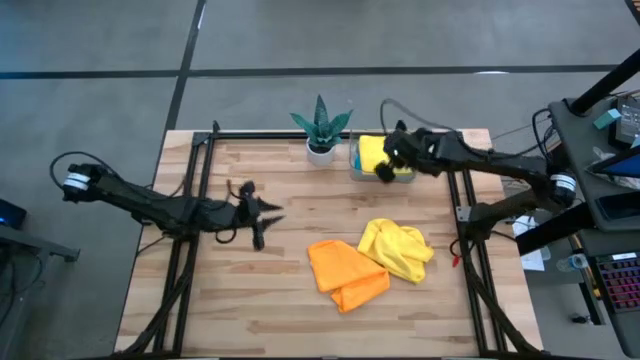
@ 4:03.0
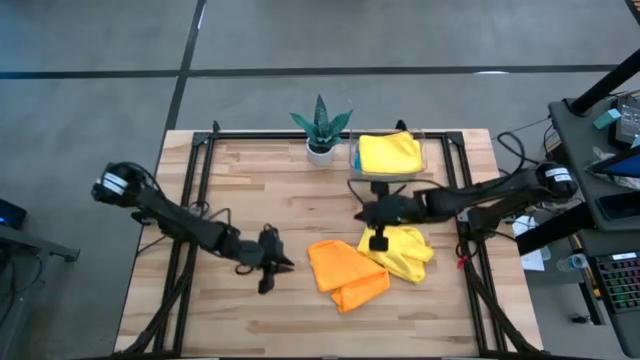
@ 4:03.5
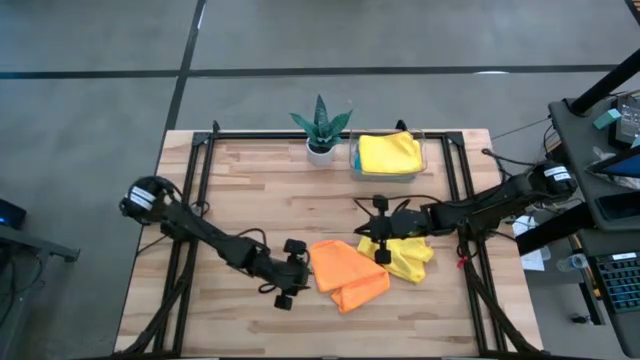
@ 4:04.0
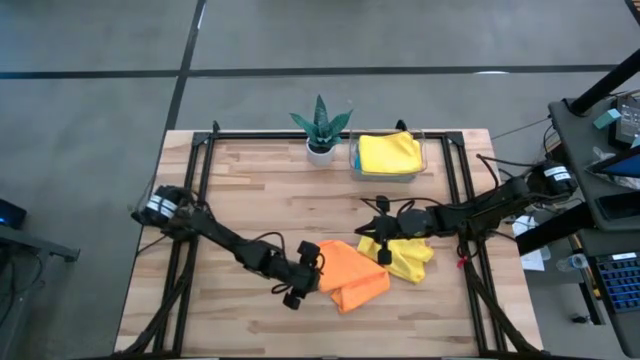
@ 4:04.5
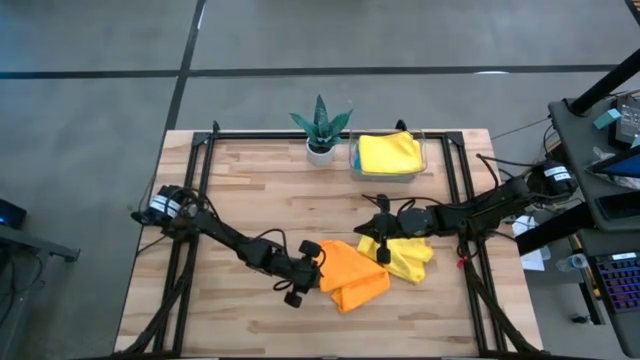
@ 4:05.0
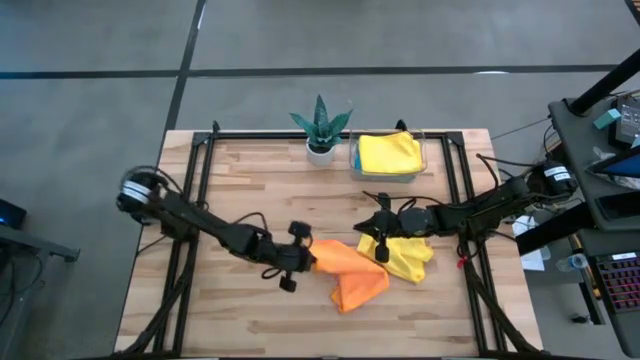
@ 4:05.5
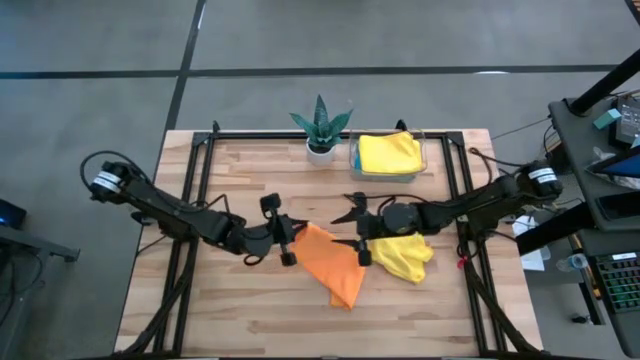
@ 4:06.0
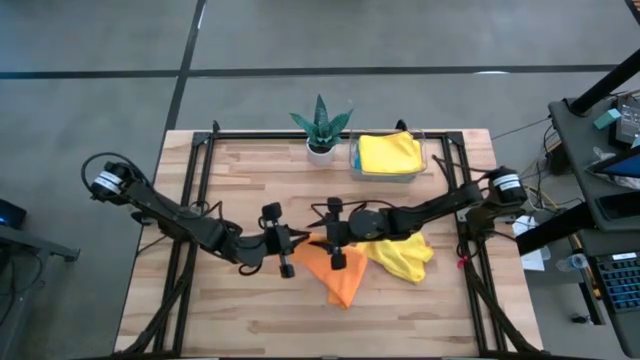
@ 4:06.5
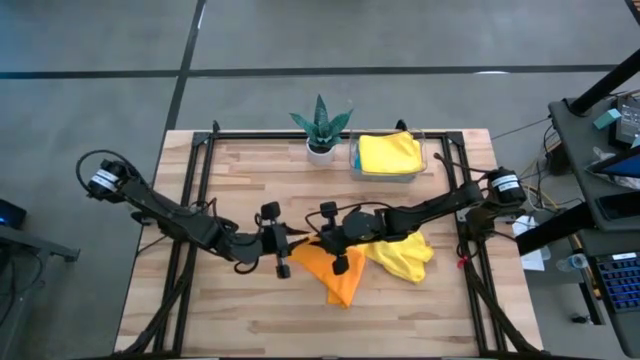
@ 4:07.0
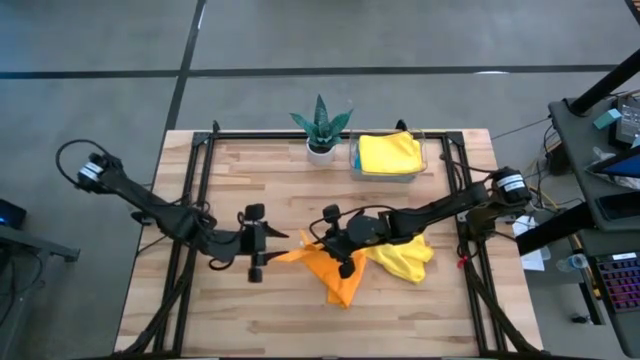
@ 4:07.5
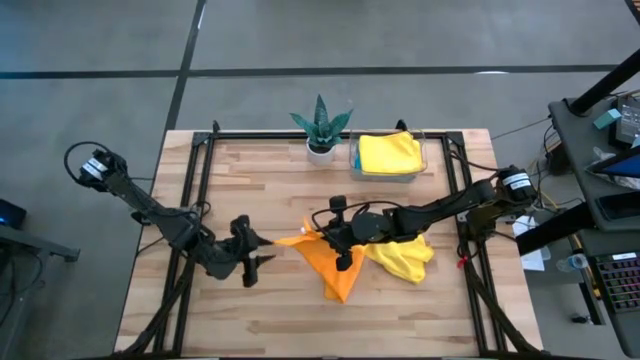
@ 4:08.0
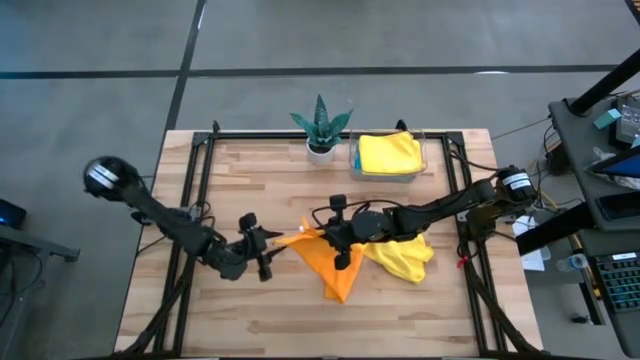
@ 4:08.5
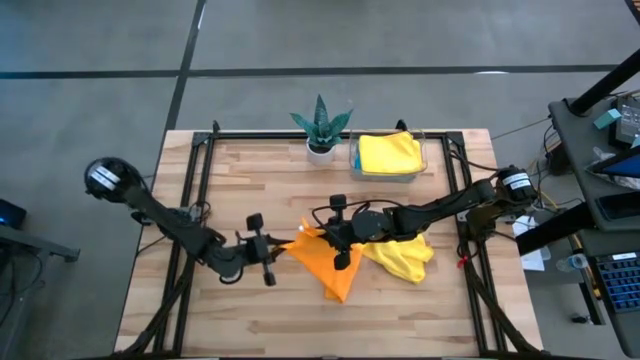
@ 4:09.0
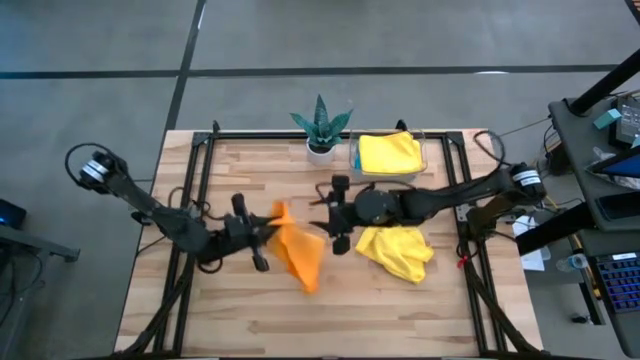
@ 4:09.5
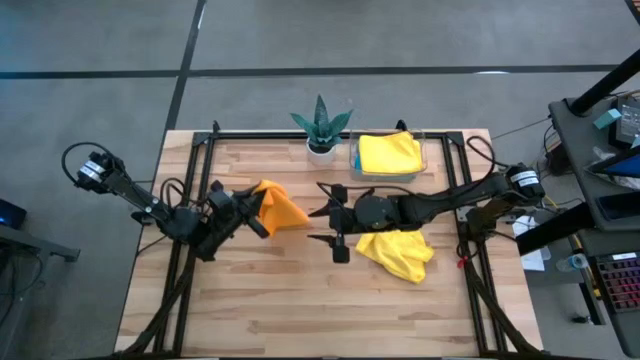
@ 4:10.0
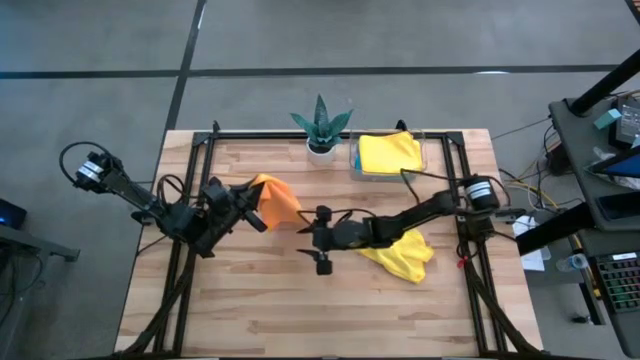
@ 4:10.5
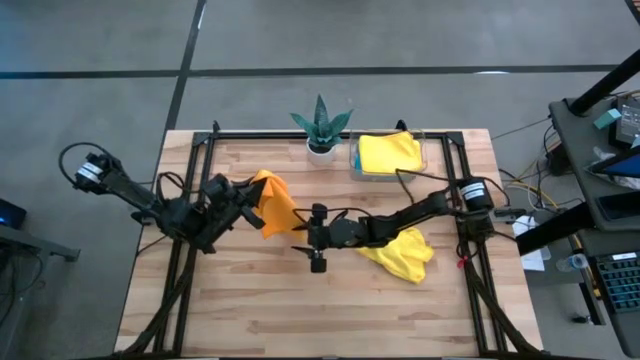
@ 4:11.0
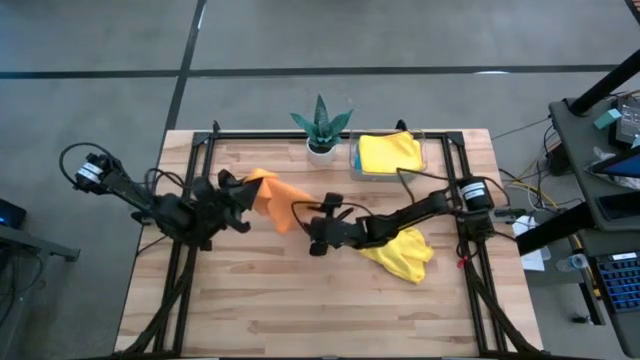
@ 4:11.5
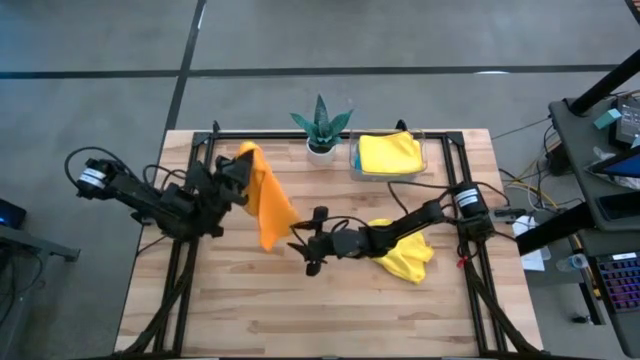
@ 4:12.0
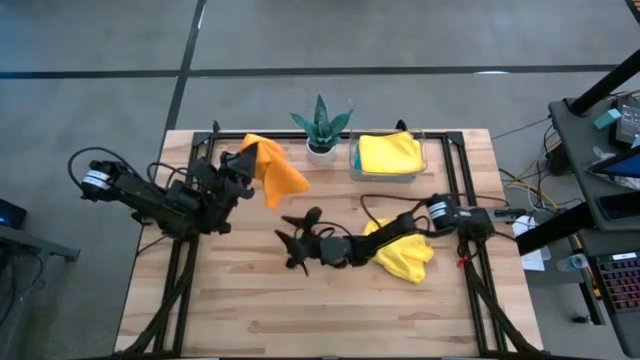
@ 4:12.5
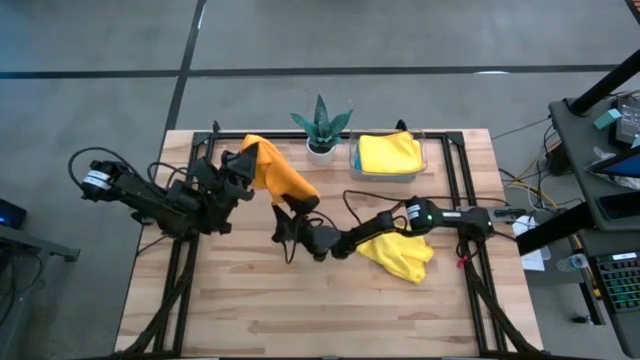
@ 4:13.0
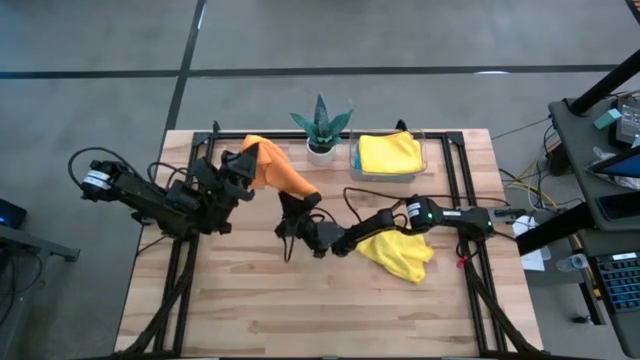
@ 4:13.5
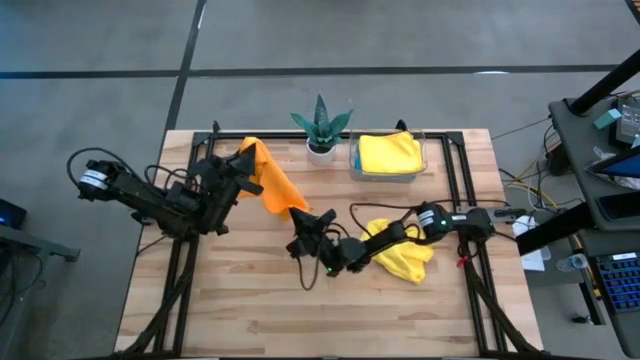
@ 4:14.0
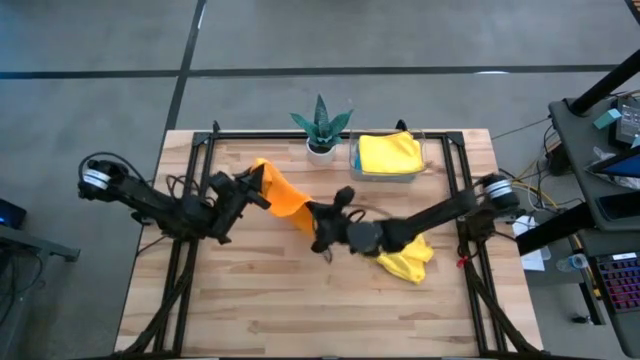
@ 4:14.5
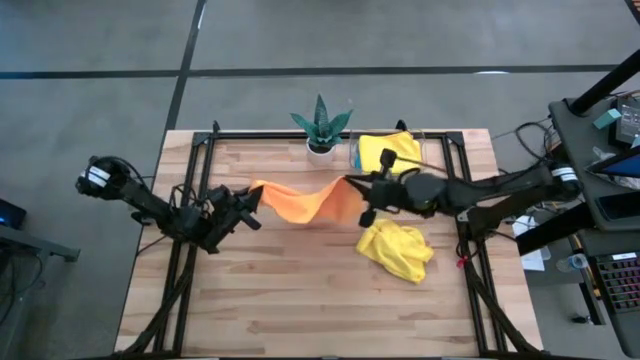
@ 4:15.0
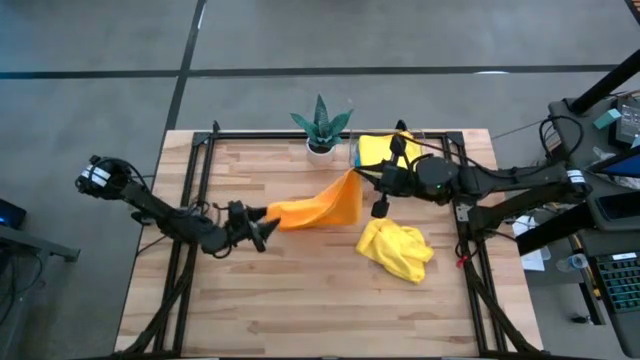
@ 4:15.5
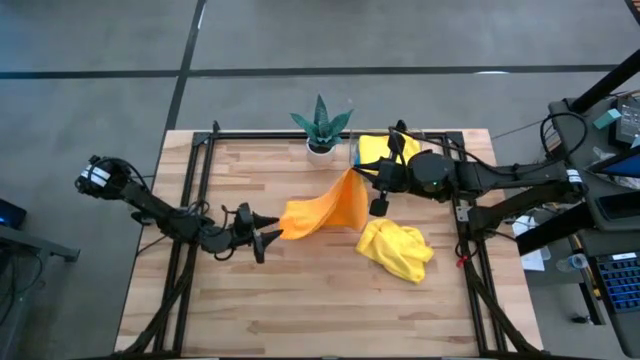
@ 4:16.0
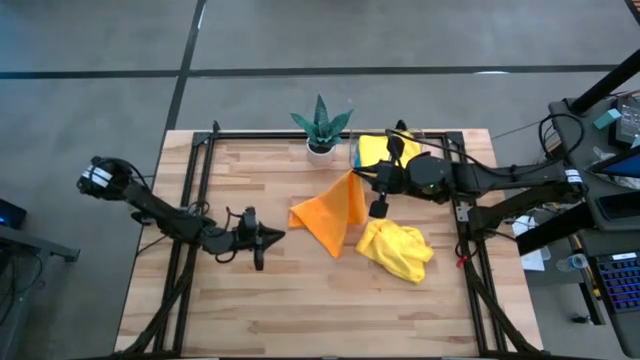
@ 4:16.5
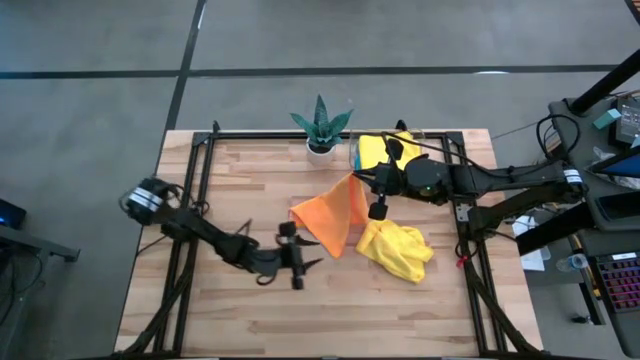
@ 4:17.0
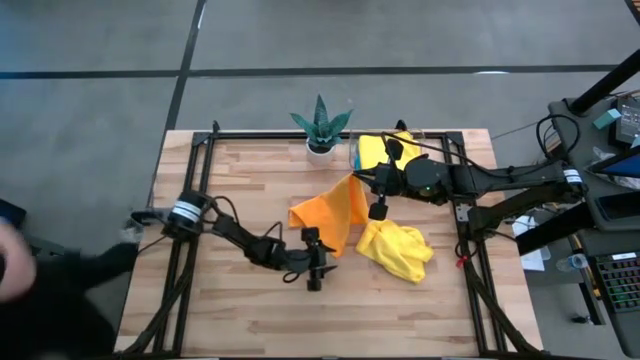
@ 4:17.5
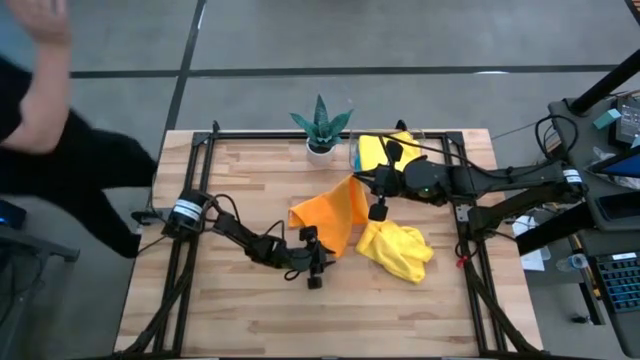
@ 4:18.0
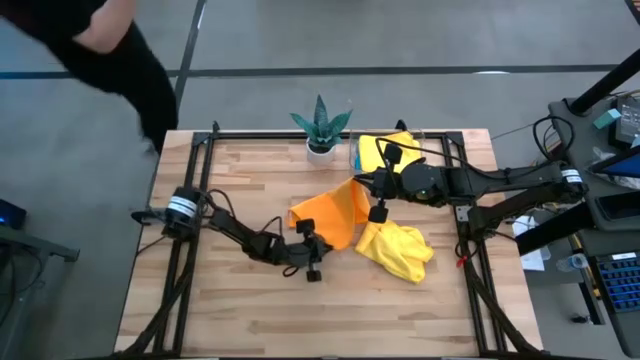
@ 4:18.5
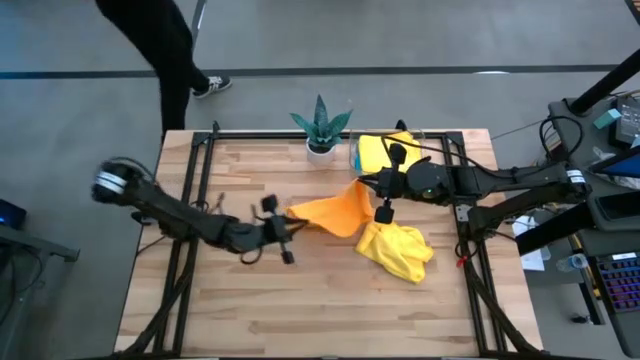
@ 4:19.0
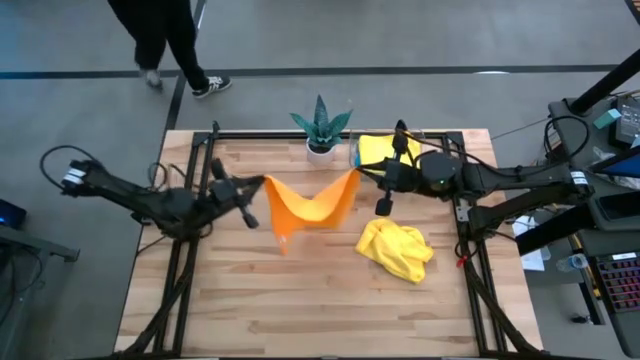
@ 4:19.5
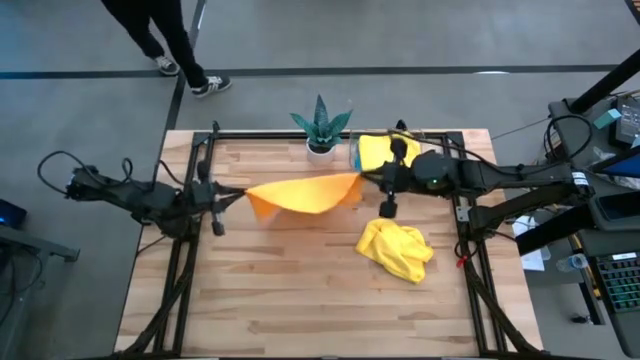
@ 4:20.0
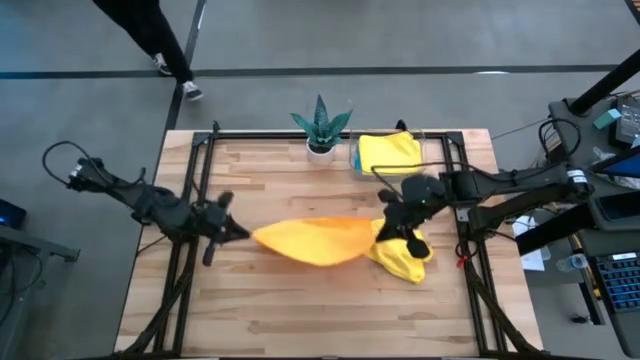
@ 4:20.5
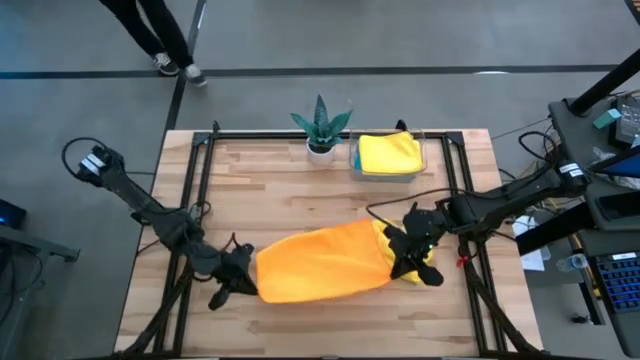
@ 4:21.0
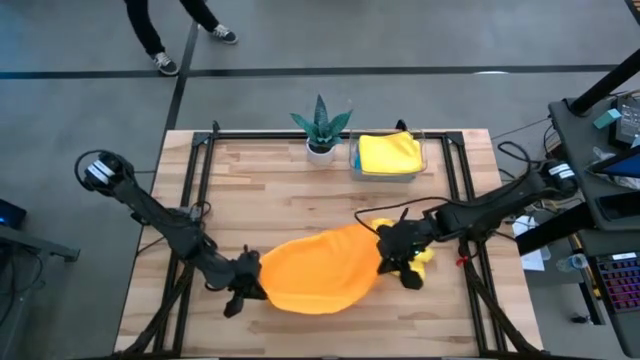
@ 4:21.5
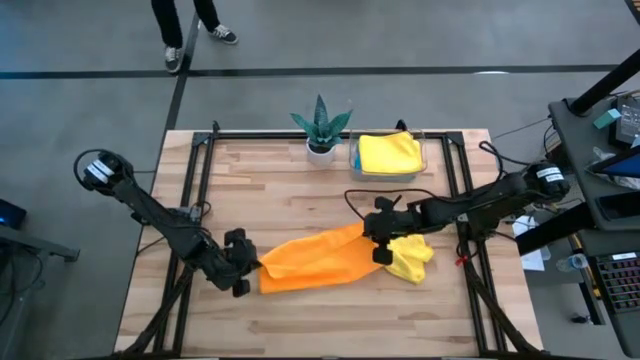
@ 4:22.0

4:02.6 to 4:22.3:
Task: Fold microfiber towels
Fold the orange microfiber towel
